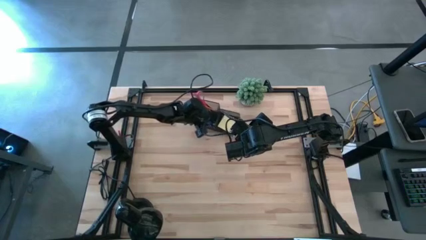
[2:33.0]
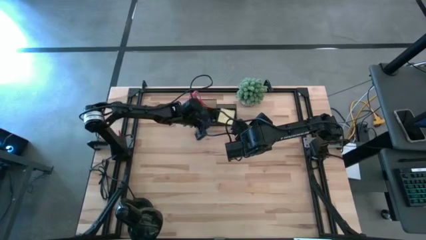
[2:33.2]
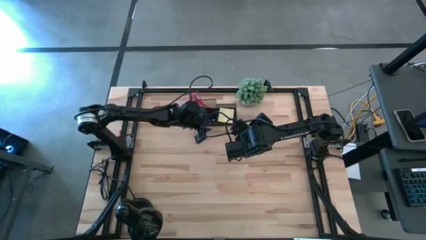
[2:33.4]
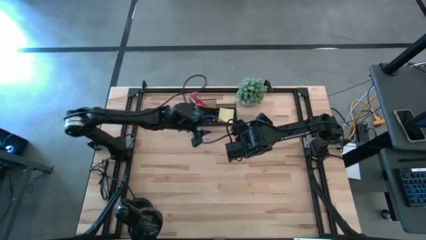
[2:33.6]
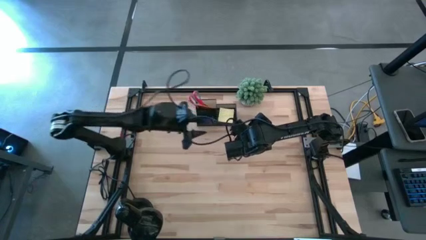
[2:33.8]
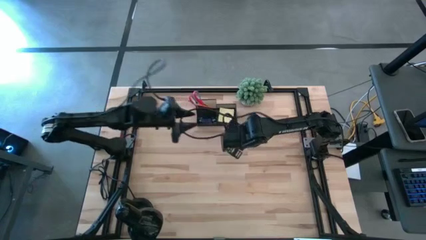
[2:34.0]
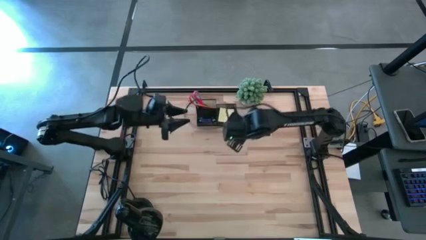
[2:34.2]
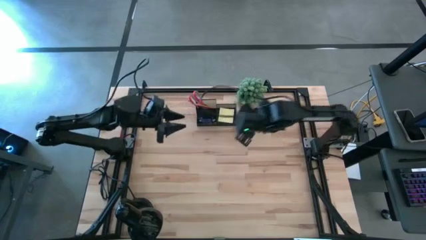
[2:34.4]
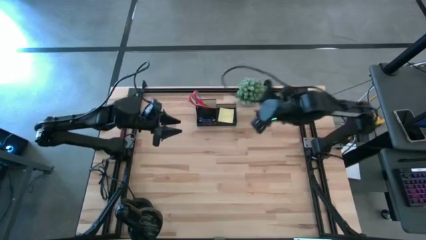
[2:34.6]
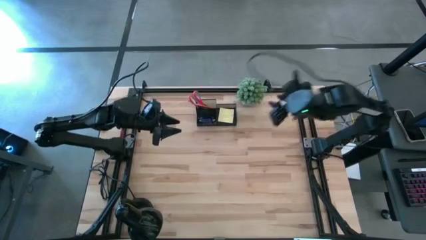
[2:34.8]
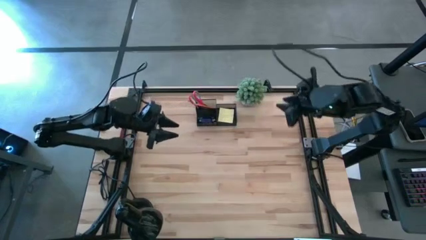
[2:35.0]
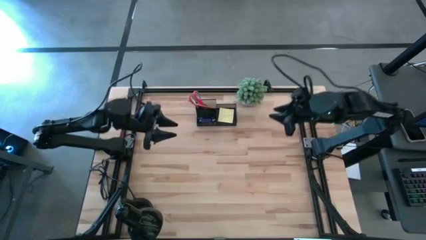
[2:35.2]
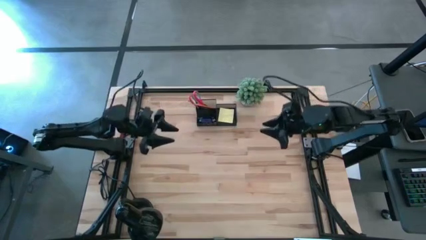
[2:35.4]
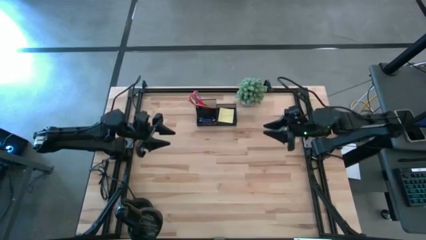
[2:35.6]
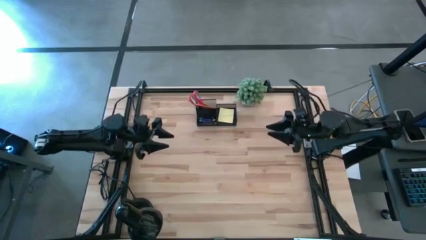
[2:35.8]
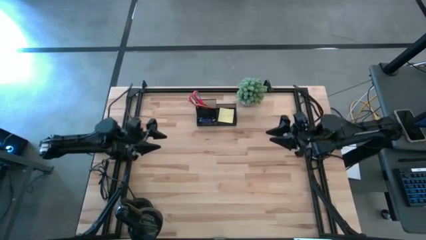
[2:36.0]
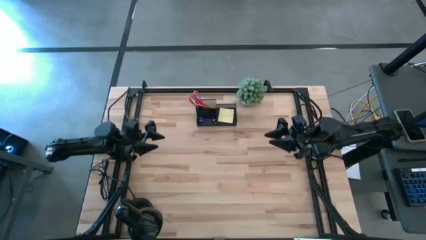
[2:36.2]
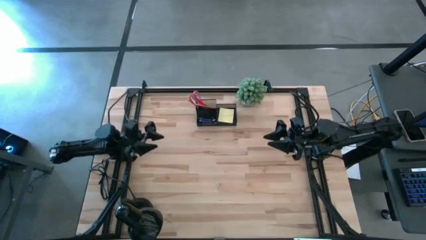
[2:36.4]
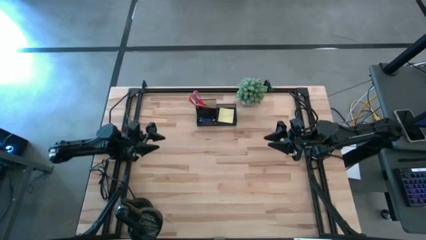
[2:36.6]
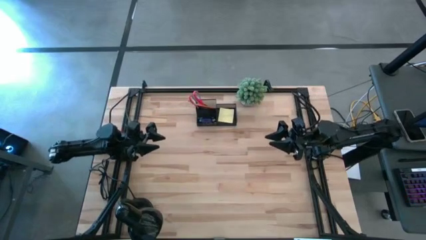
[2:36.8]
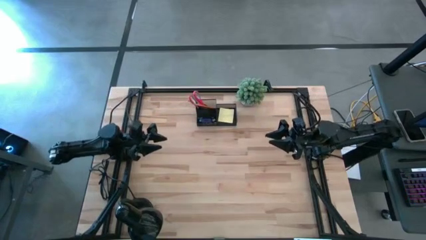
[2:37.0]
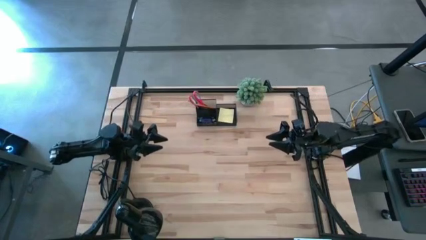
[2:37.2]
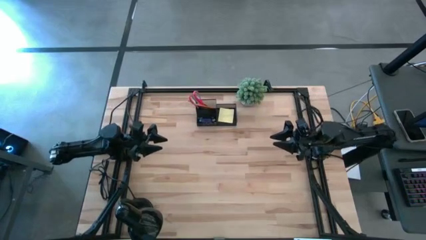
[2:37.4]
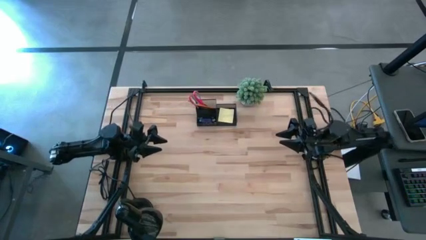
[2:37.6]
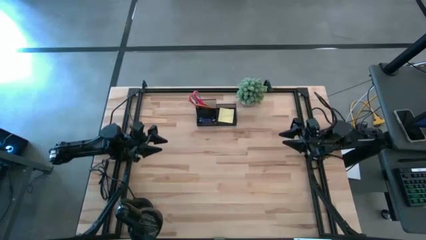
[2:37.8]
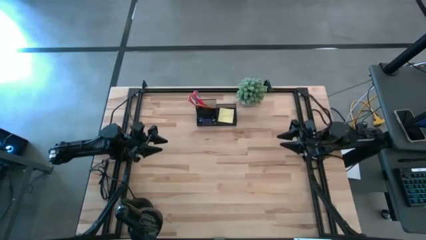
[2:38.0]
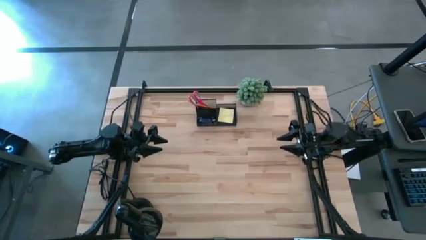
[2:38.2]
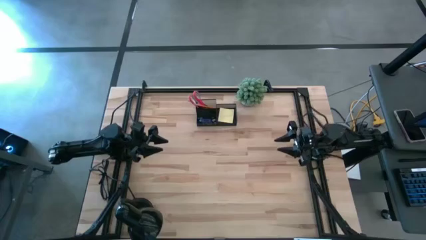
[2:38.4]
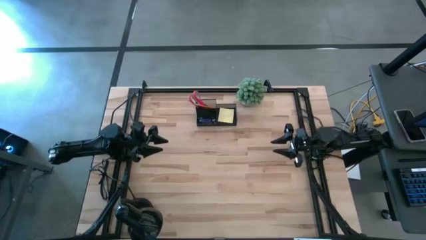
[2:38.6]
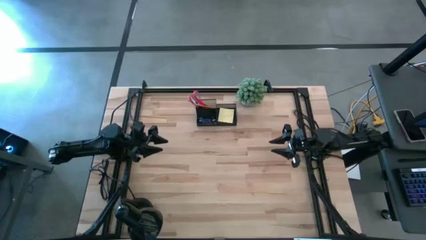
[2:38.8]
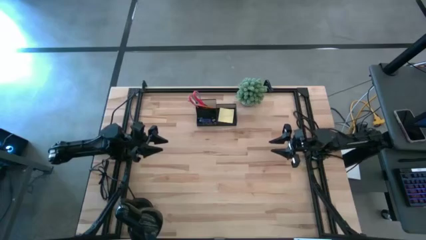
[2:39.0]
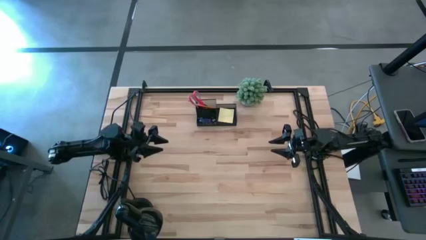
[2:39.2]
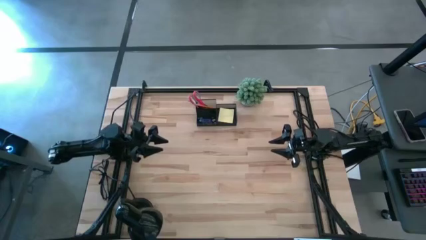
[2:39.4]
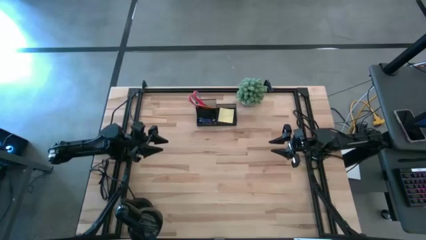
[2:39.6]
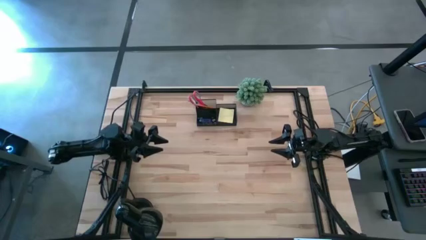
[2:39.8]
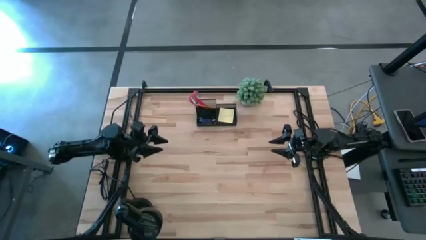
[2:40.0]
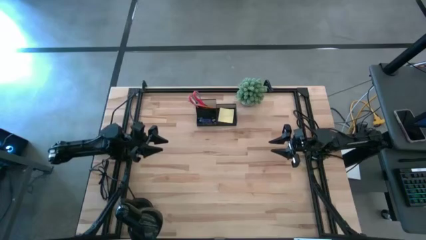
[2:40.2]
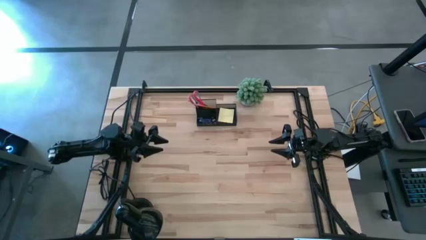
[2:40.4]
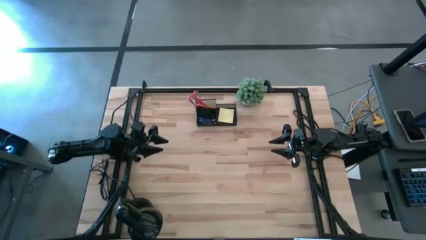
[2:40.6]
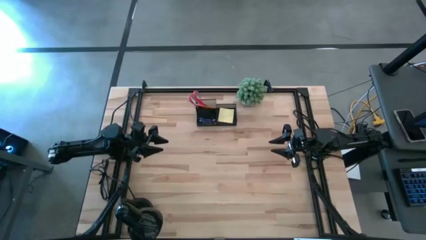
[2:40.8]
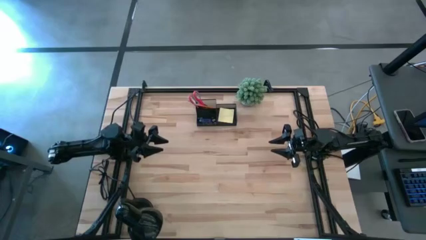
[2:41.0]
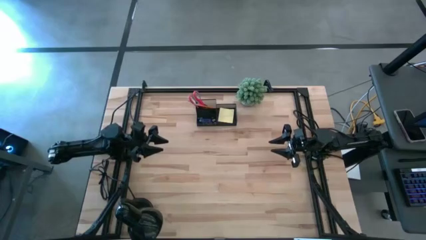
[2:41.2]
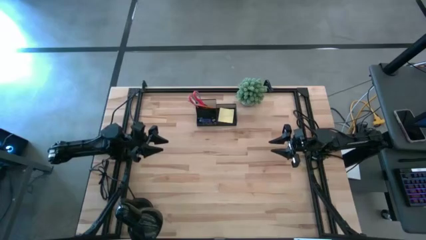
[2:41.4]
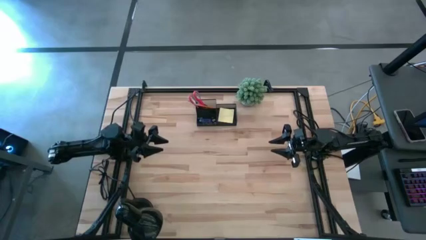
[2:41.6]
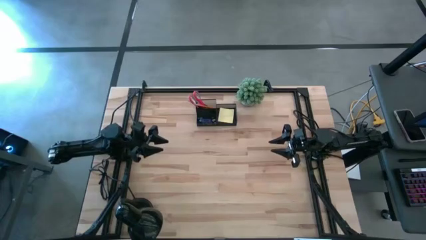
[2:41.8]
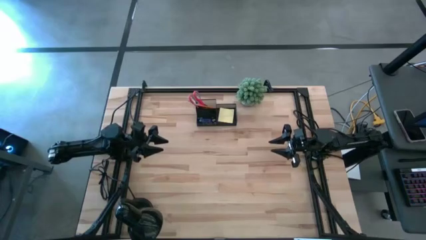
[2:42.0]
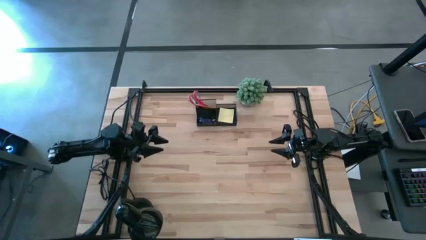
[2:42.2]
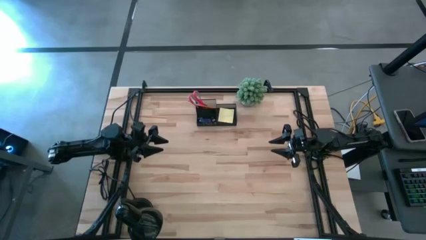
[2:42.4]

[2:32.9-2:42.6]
Task: Pick and place office supplies into organizer
Return to Home Position

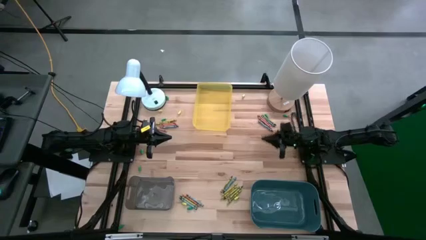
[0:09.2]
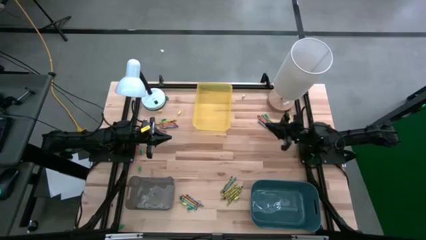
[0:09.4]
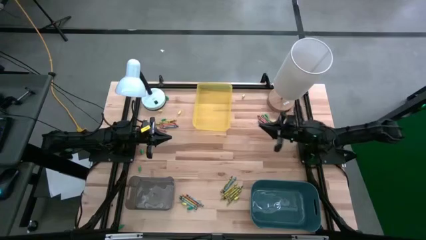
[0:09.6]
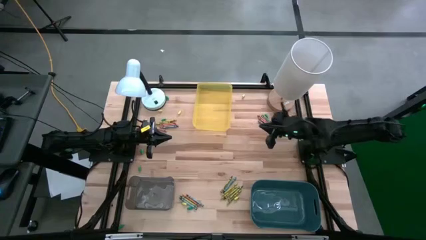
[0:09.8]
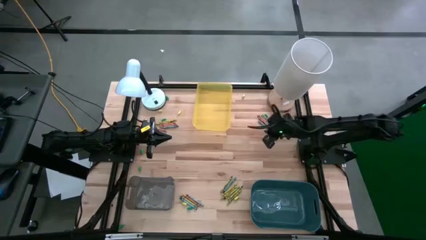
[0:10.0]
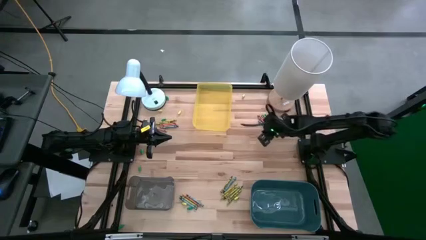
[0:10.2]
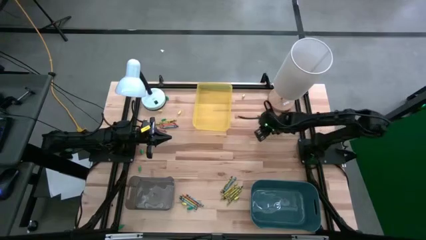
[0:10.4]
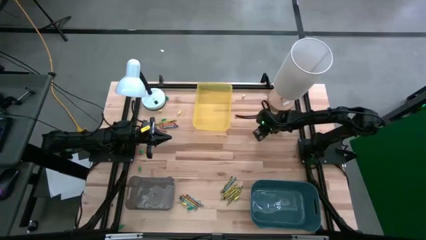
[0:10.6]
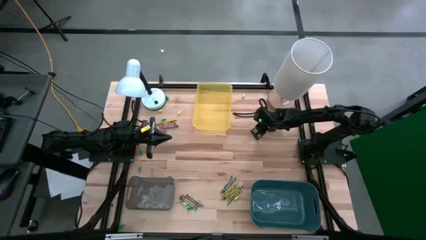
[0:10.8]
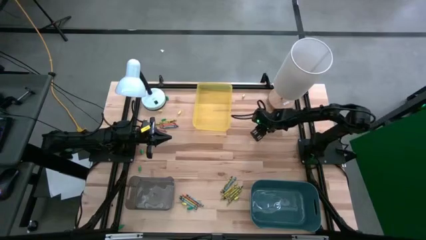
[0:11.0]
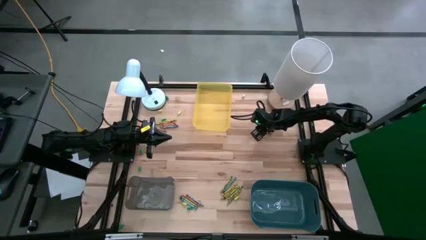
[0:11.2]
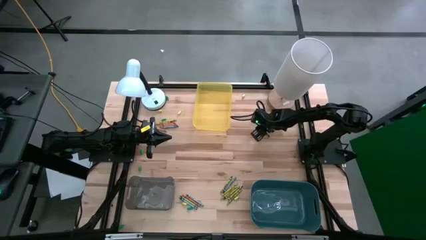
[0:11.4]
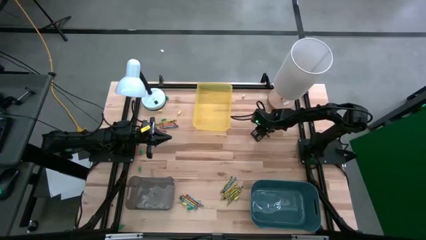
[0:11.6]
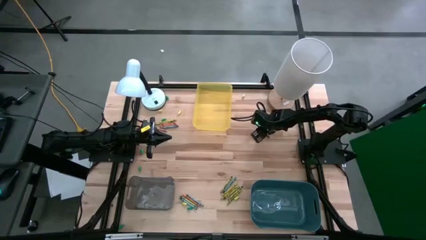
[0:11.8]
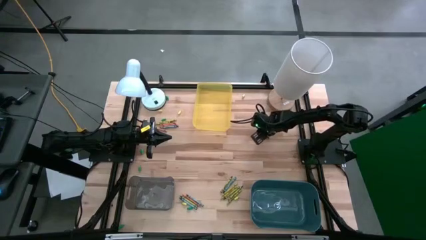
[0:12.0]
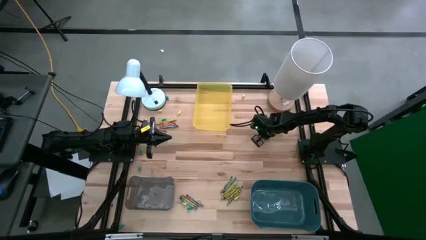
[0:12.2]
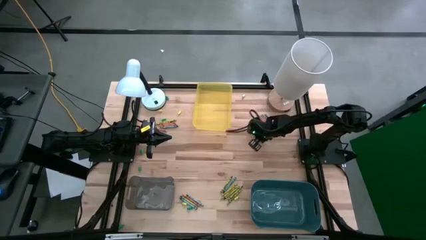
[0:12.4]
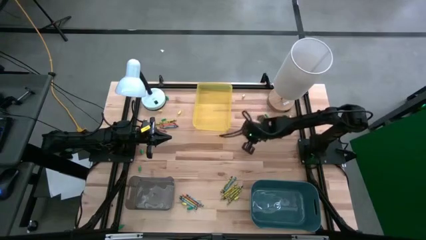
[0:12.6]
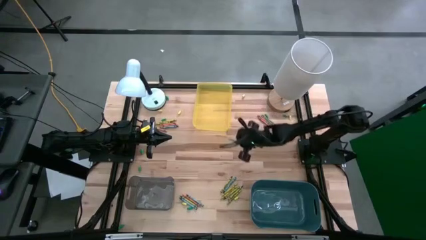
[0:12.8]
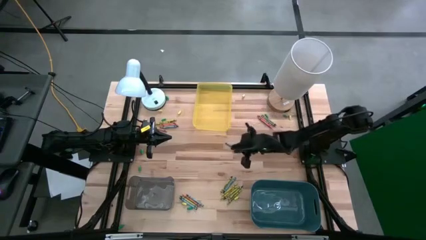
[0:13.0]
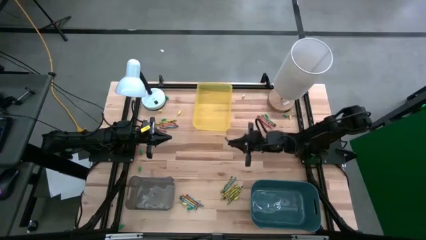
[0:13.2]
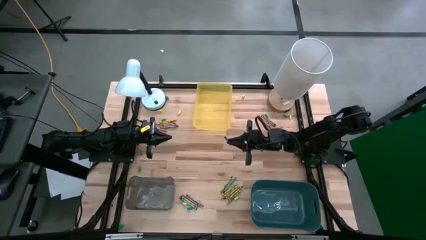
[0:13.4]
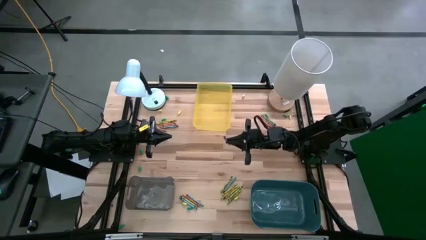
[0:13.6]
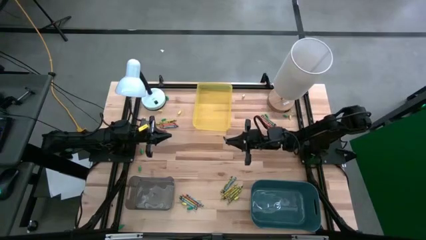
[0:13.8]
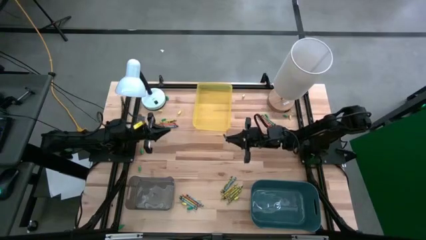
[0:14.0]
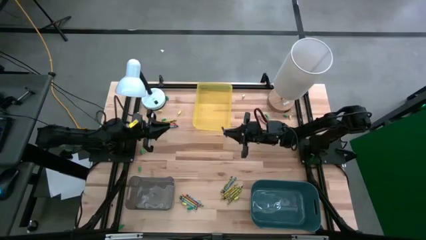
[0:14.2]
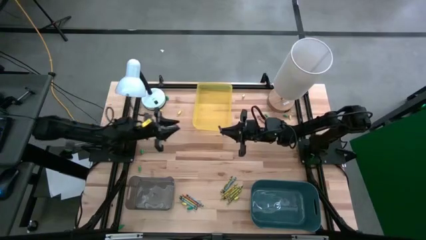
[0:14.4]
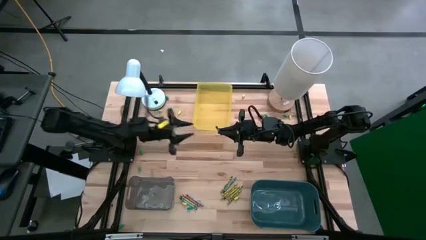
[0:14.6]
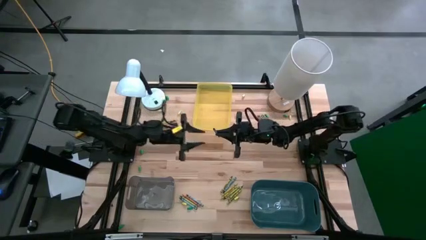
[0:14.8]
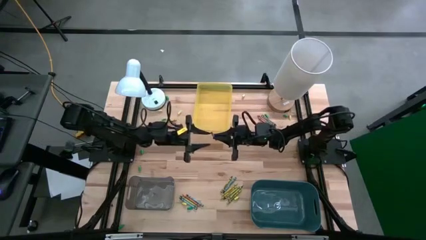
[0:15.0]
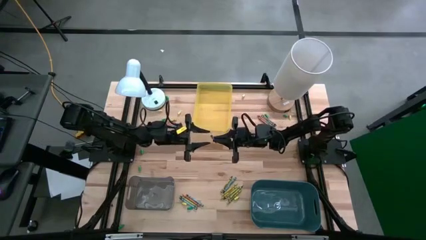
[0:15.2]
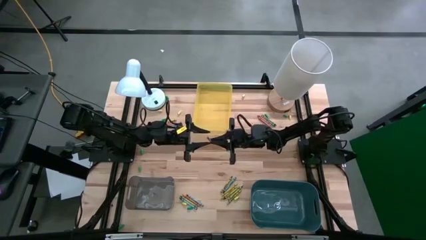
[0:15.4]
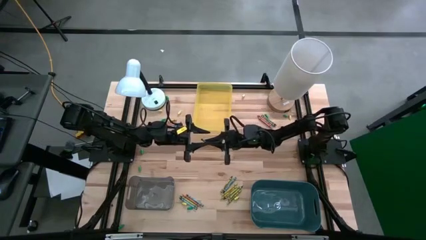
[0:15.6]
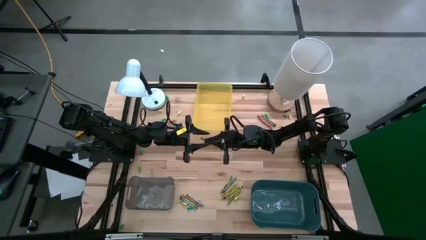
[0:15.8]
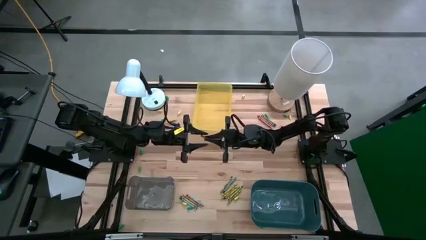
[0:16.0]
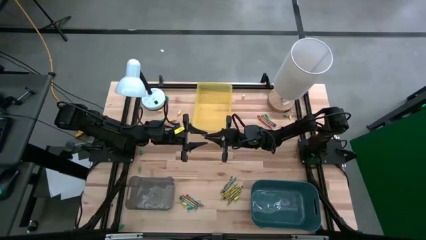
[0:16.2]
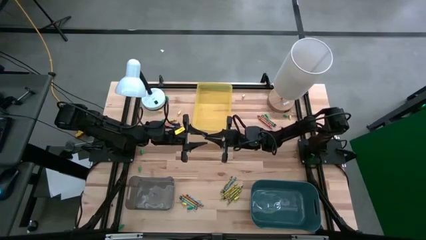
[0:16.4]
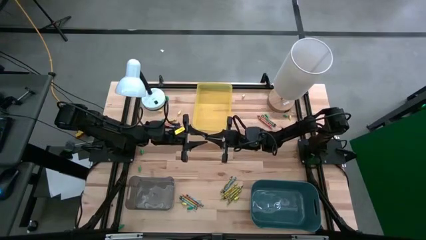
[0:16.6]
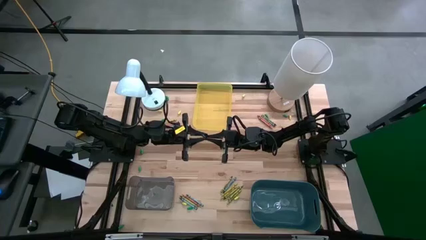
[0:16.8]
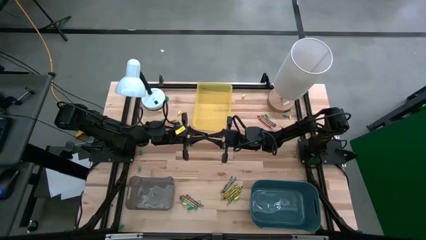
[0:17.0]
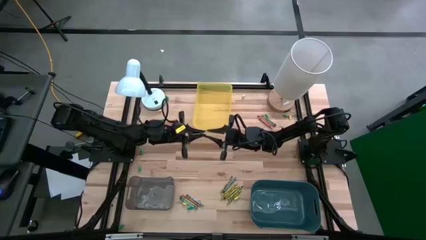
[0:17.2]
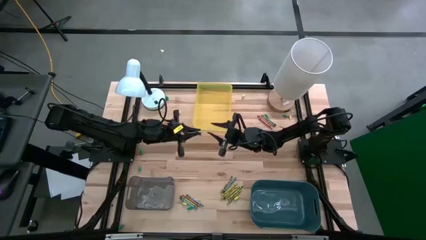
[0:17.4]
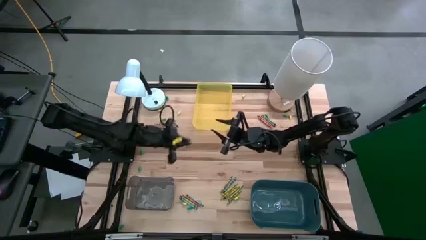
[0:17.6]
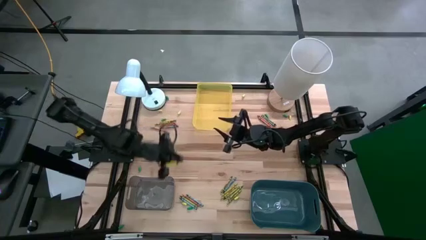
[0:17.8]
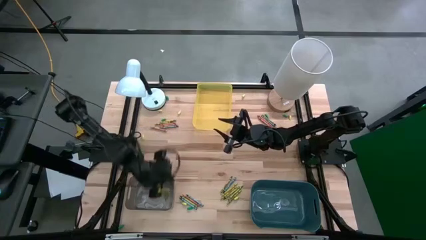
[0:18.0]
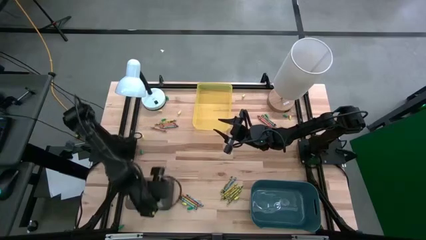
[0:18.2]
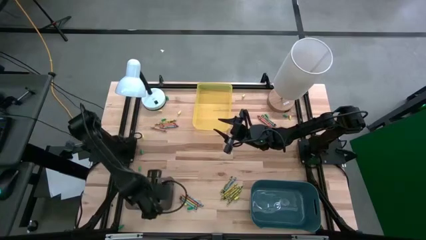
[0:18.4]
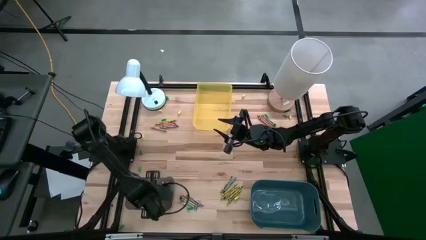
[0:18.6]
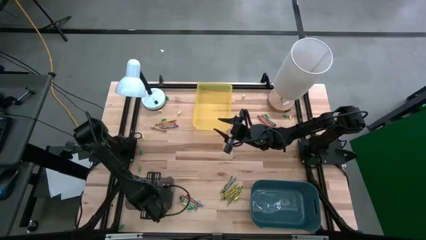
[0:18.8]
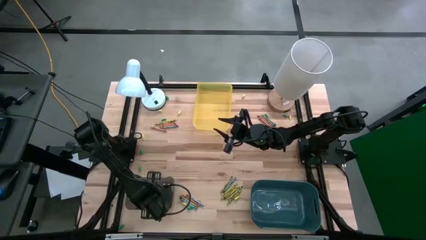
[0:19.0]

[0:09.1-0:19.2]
Task: Sort crayons
Put the blue crayon into the black bin
